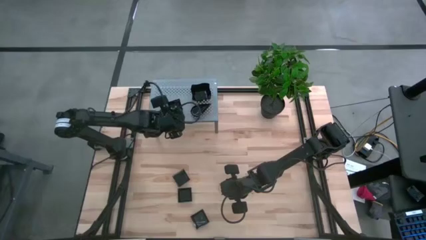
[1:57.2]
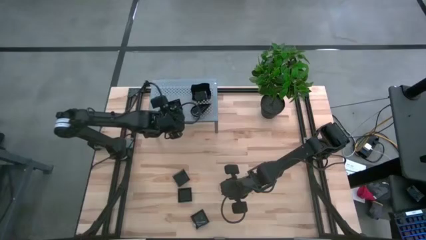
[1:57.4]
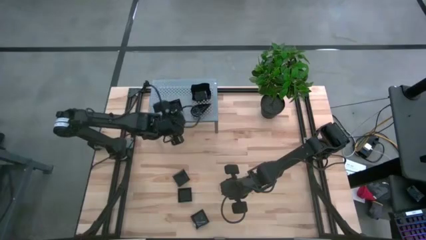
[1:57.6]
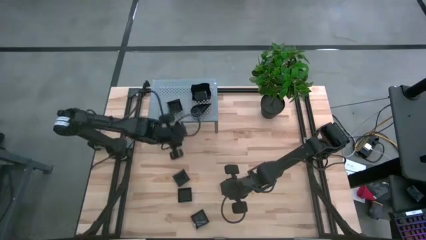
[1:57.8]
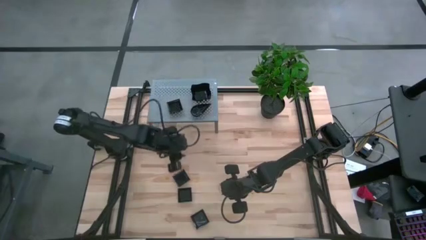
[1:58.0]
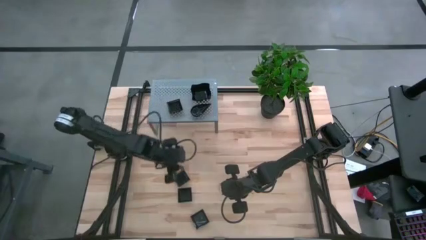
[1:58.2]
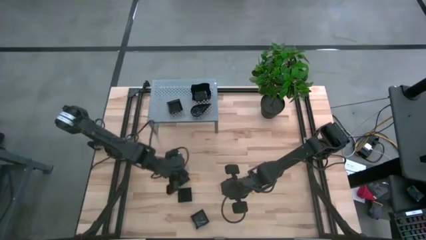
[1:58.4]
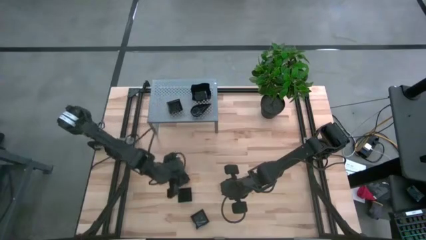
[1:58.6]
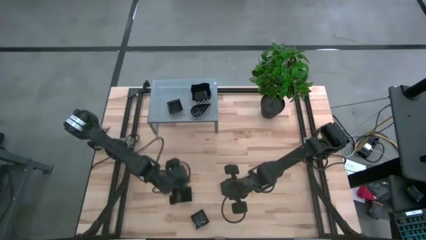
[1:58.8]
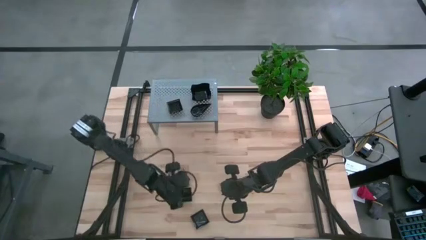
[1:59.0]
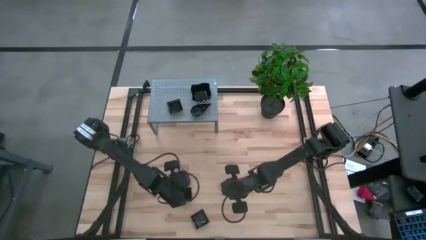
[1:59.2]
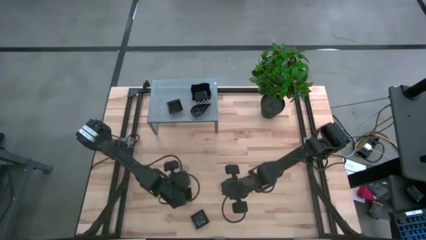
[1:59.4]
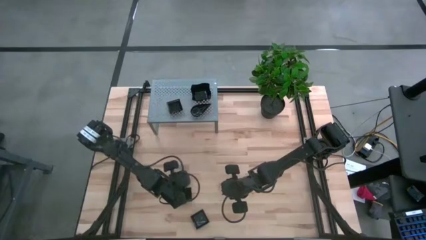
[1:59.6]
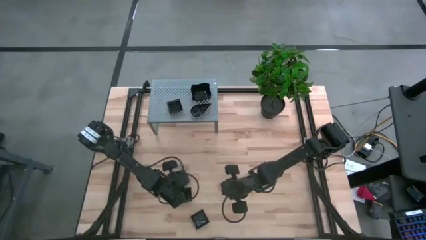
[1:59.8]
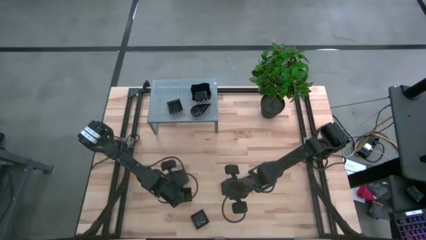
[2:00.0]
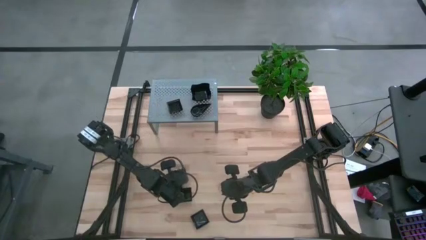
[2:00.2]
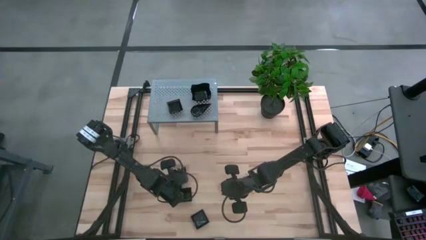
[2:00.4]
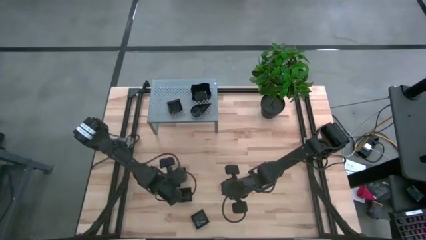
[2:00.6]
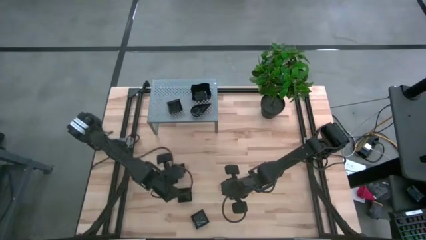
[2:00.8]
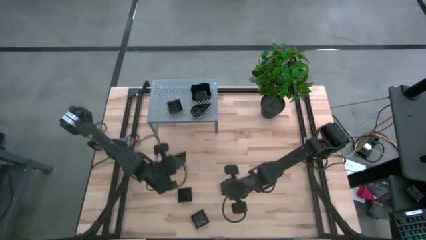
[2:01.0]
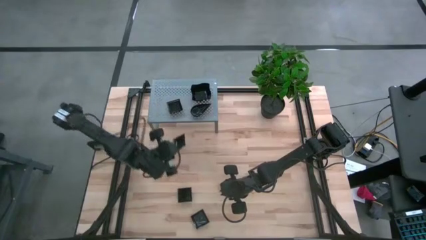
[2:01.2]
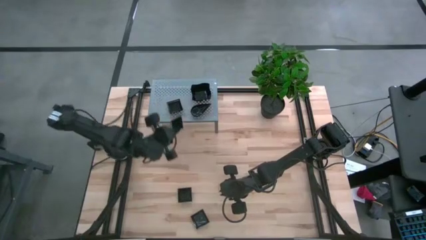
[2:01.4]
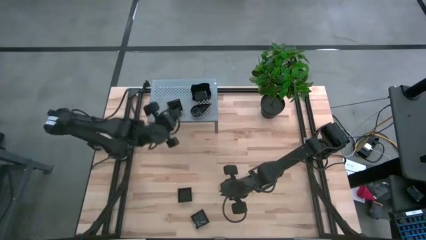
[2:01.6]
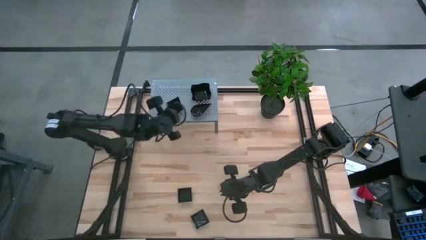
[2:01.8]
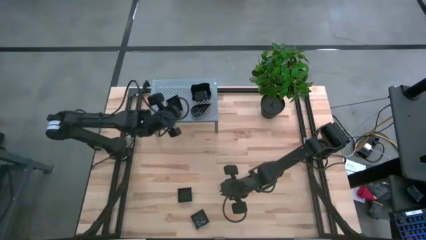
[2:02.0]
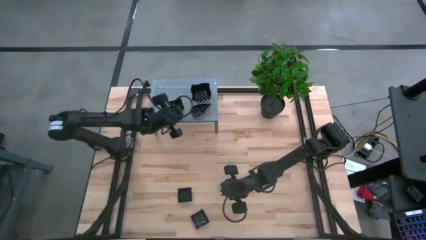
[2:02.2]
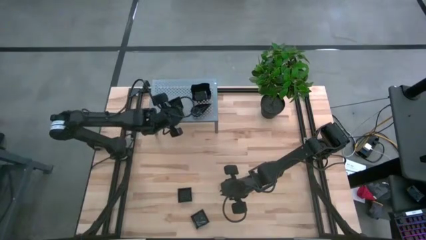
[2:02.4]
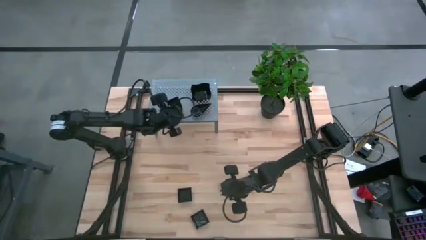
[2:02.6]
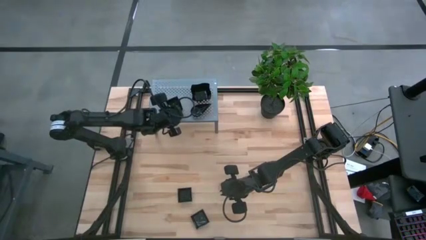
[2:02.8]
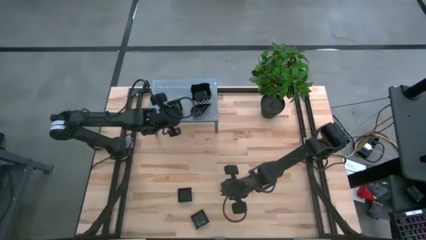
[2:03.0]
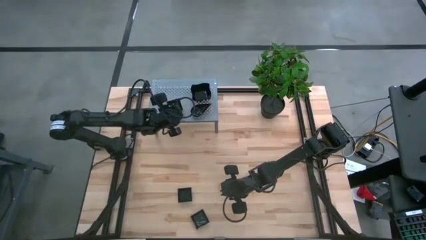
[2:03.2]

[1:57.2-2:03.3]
Task: Pick & Place Mini shaped plates
Stack the square plate on top of the stacked square plates on the shelf

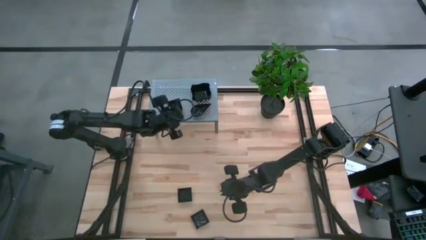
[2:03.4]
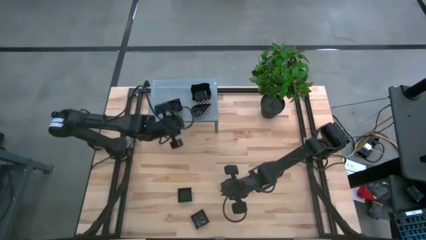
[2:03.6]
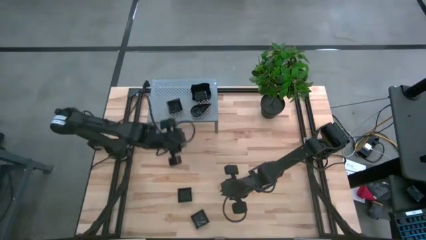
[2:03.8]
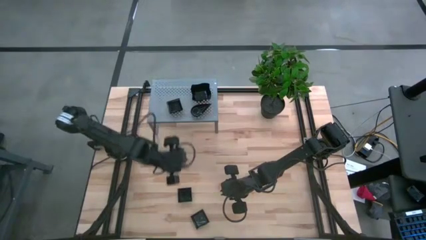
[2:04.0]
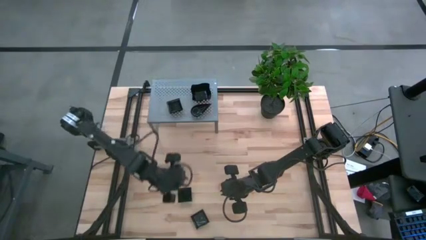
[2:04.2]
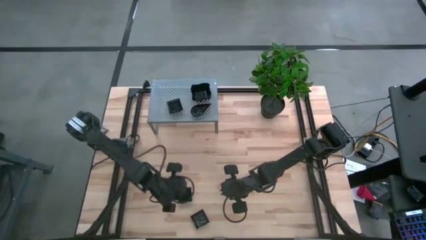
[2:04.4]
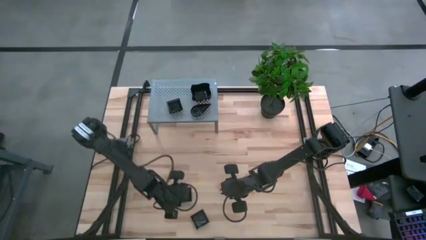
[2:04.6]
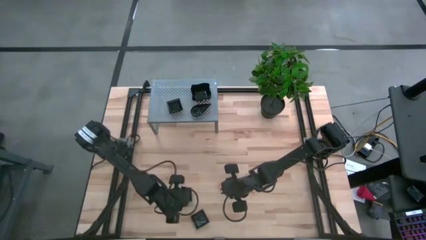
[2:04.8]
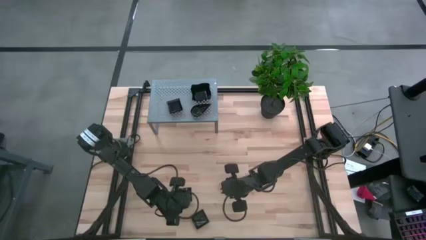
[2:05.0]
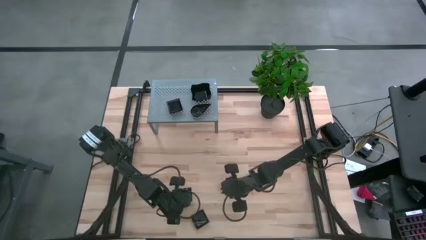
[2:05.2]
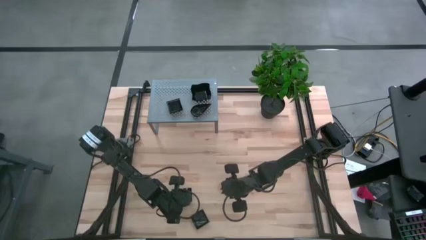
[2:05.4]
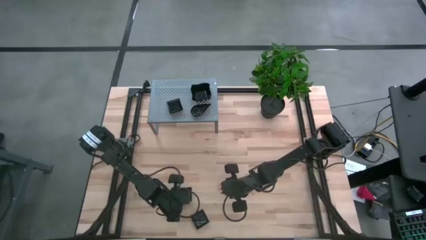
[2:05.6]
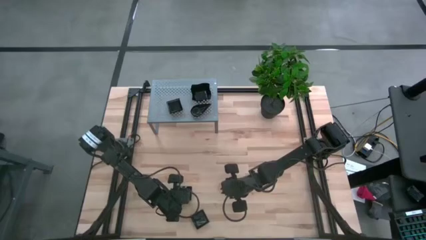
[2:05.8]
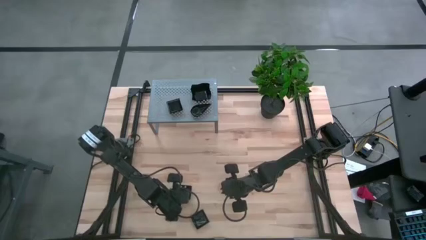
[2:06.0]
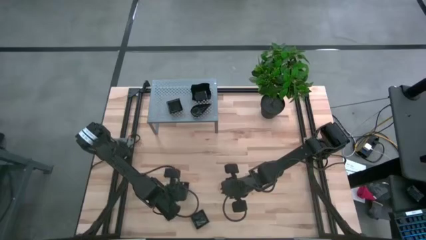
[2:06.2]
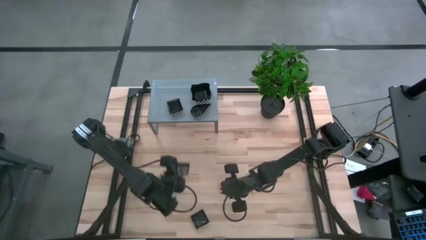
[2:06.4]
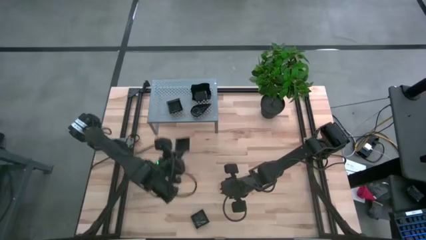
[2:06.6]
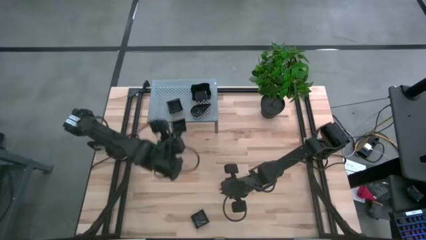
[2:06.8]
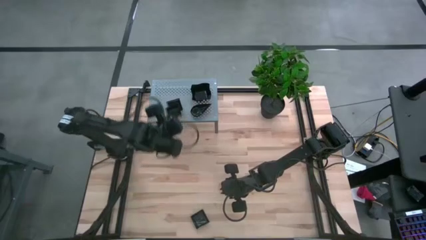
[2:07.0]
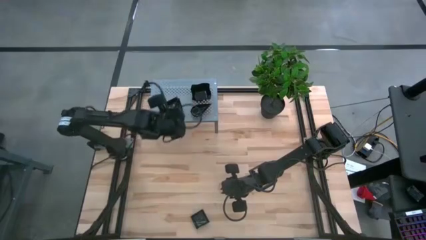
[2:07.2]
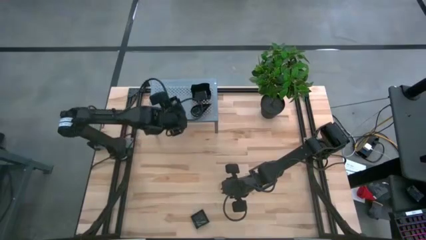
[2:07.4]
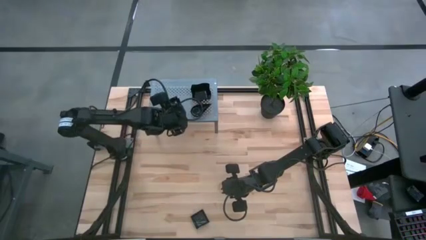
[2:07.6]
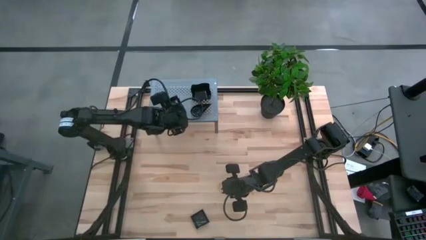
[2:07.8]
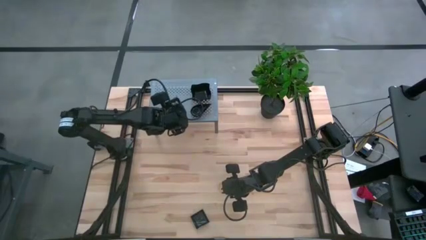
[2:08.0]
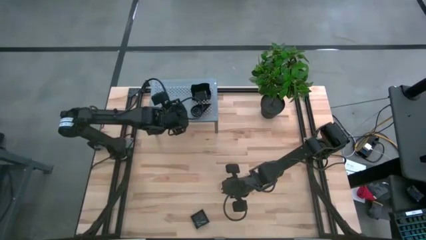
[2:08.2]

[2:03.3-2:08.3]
Stack the square plate on top of the stacked square plates on the shelf

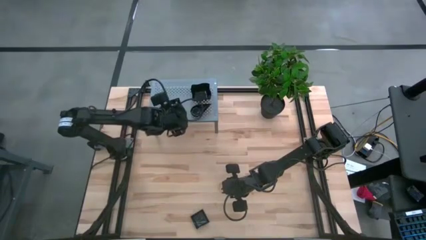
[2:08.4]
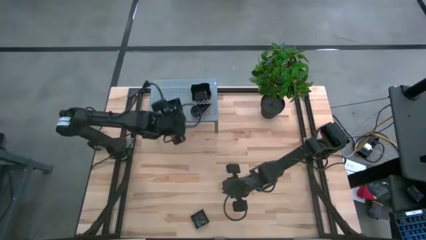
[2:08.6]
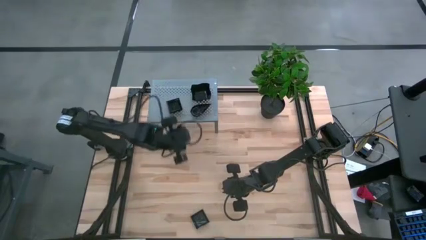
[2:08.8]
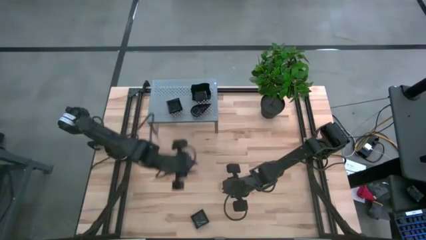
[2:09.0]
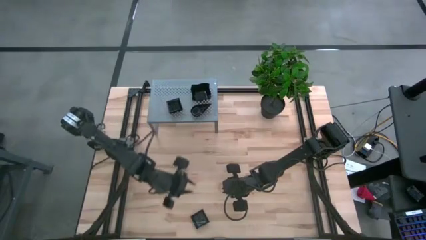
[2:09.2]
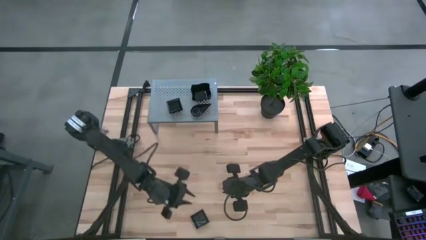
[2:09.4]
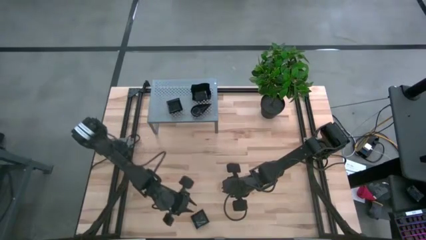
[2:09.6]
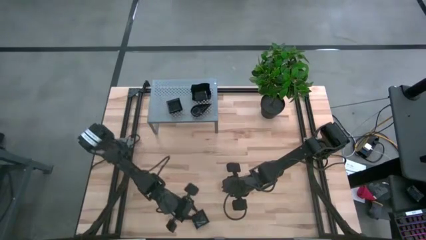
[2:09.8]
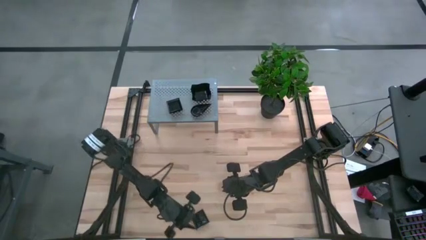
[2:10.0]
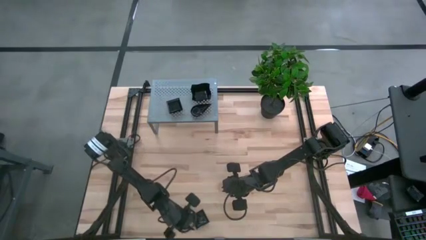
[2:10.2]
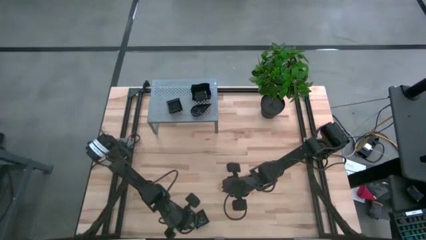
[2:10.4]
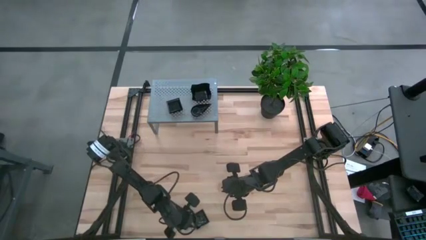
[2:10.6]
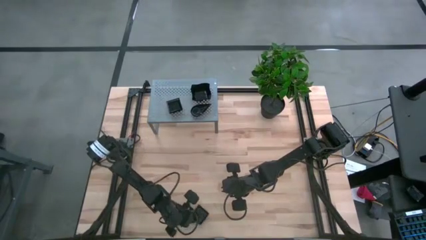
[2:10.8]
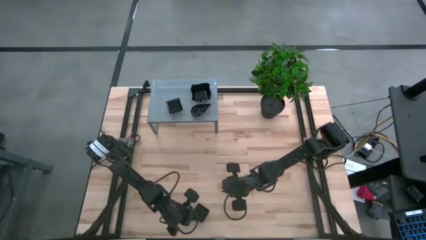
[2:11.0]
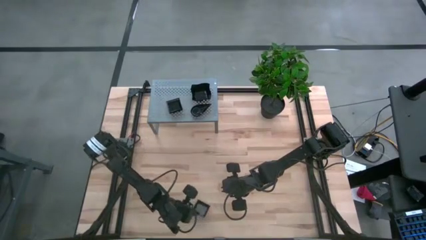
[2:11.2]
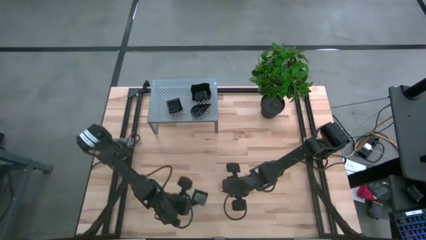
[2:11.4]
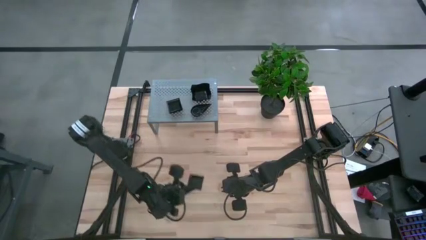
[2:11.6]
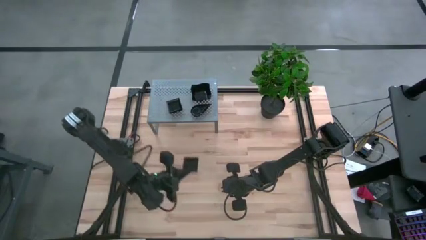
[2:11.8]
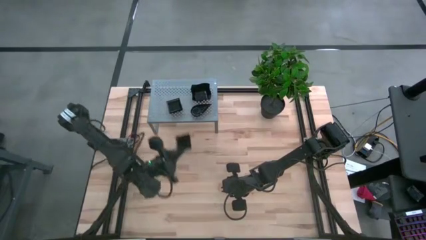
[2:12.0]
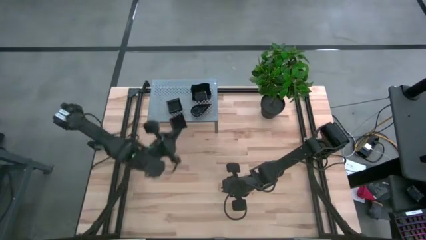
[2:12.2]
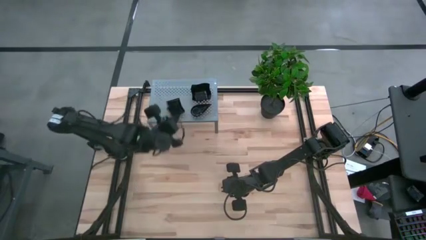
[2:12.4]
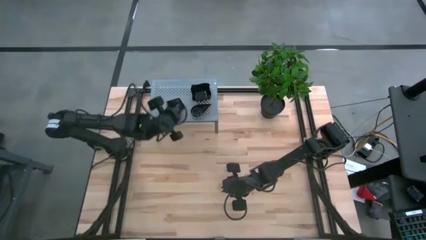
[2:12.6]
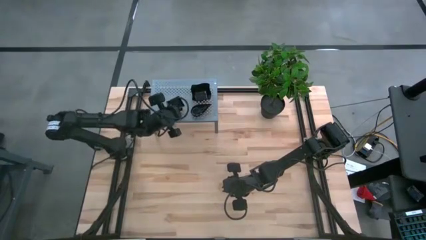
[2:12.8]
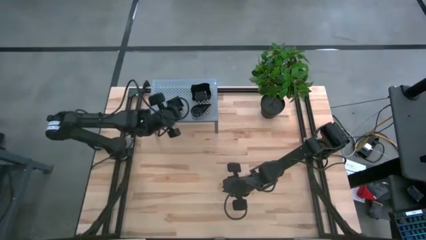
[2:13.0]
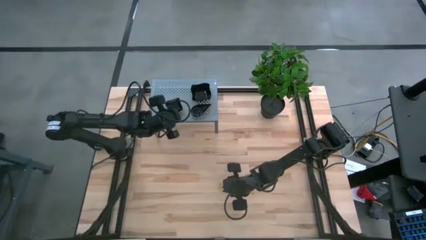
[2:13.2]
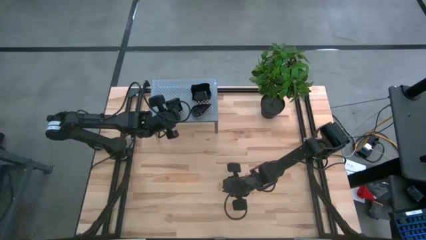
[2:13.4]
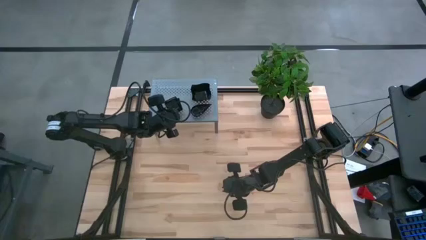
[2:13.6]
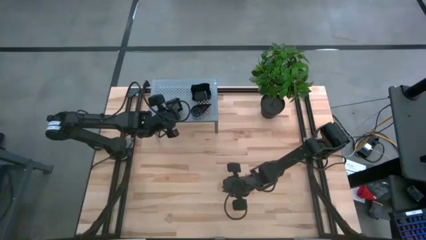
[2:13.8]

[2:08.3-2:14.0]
Stack the square plate on top of the stacked square plates on the shelf
